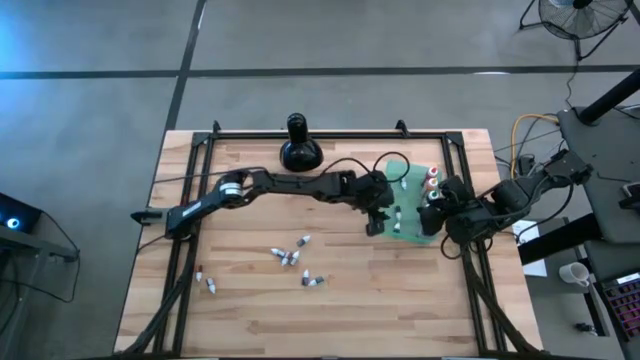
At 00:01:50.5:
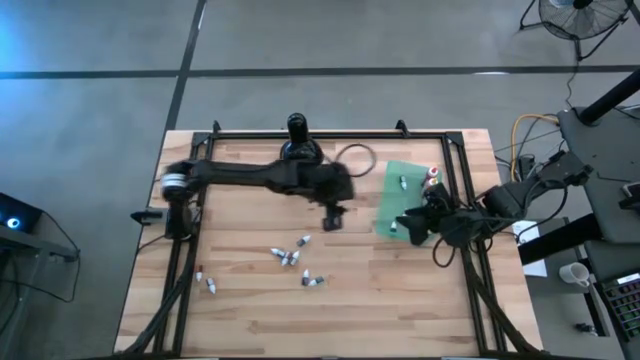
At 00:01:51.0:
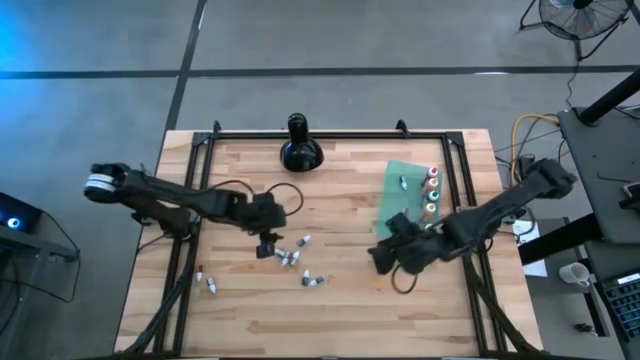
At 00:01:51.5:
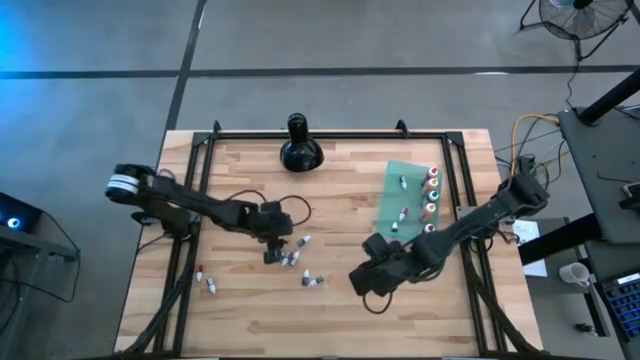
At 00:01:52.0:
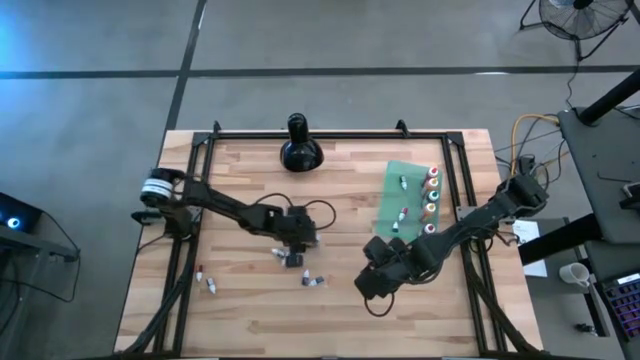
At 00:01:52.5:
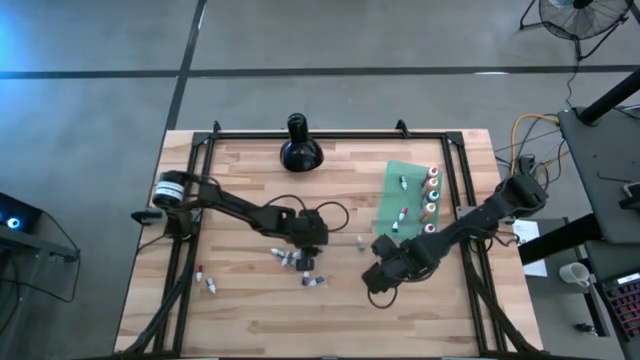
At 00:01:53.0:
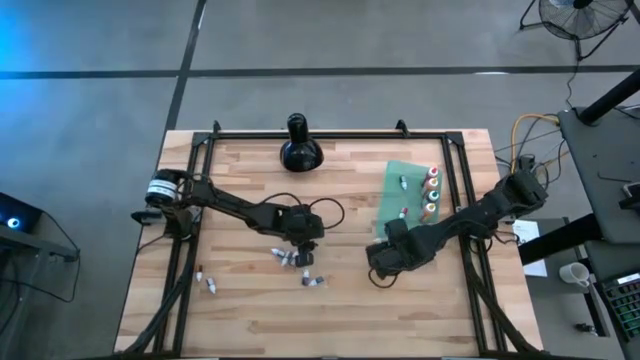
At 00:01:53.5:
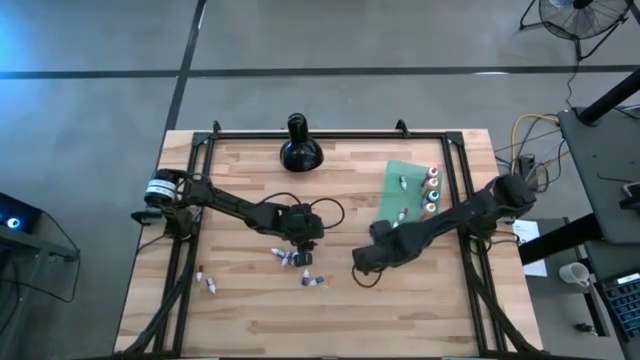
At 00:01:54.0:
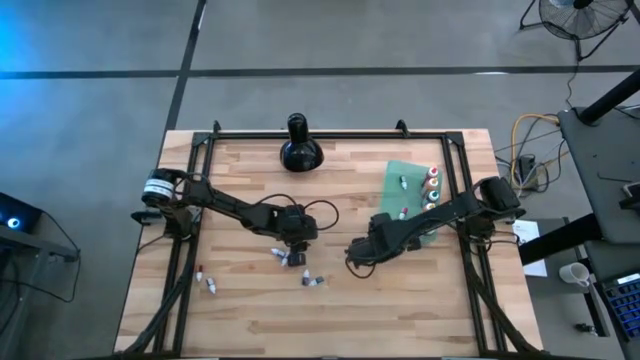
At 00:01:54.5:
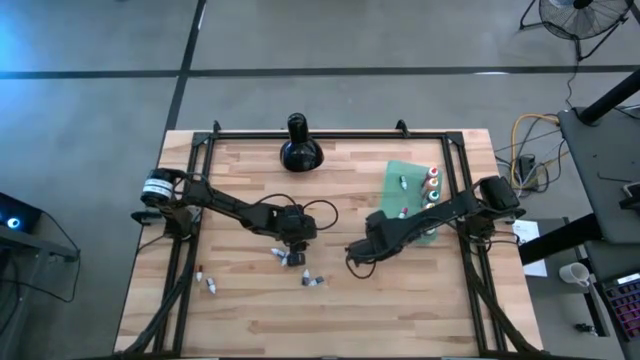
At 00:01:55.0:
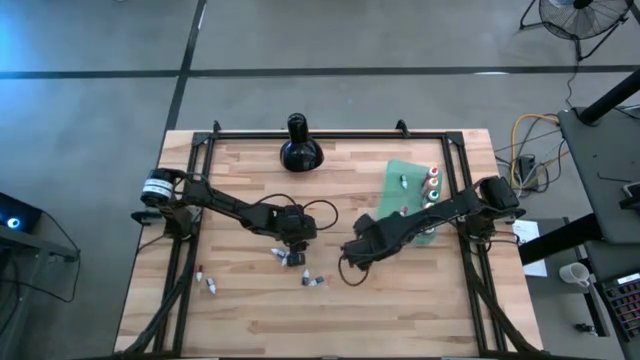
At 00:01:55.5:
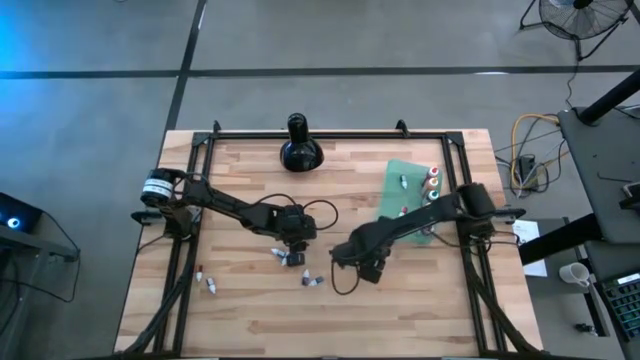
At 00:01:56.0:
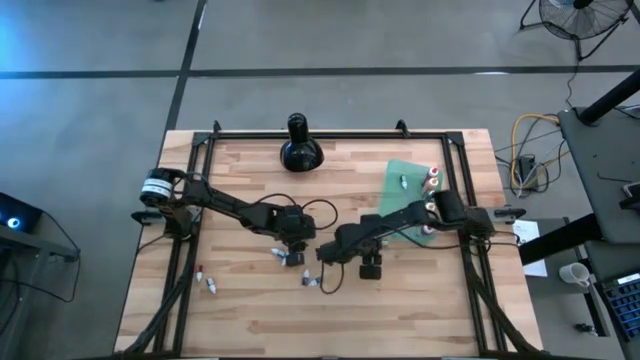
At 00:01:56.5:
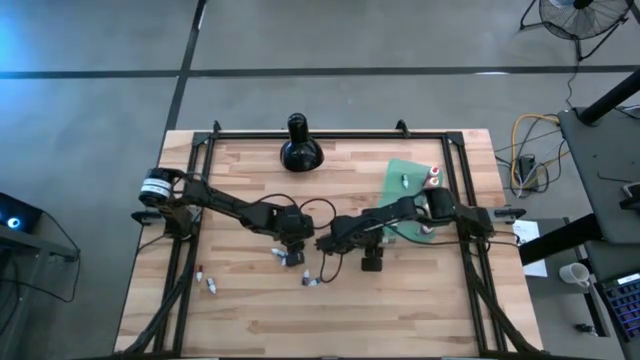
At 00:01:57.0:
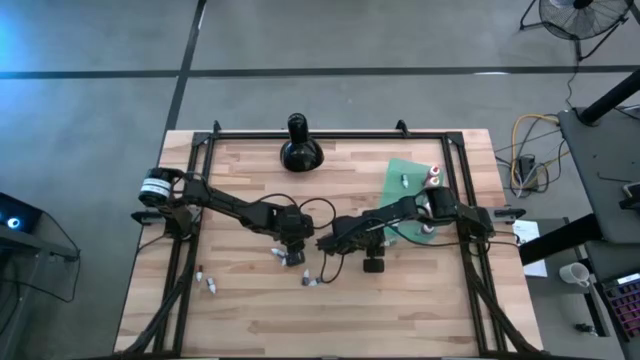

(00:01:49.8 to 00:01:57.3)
Task: Pick & Place food coloring
Put the top small green food coloring bottle into the green bin

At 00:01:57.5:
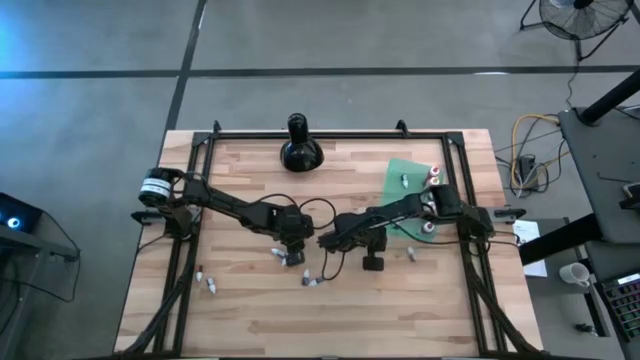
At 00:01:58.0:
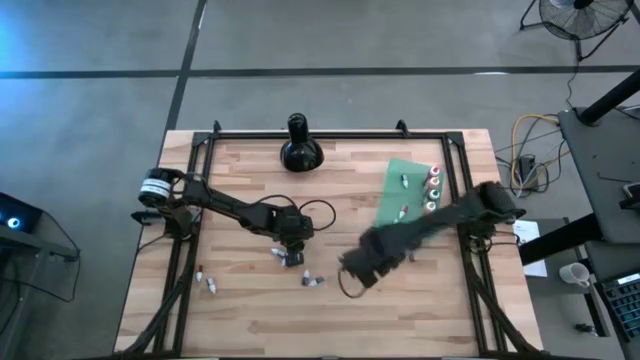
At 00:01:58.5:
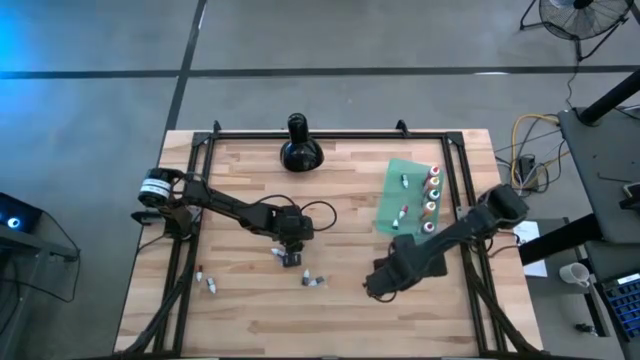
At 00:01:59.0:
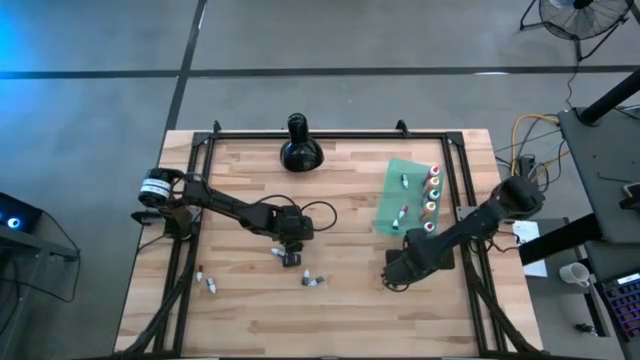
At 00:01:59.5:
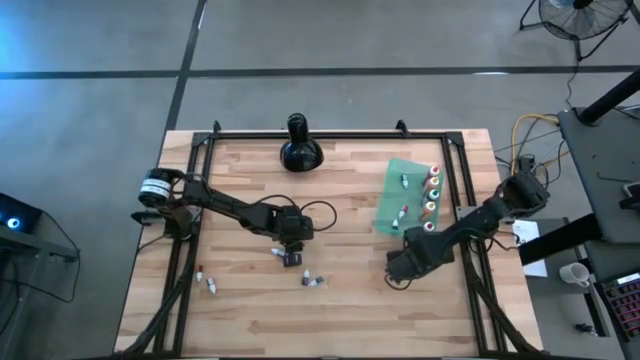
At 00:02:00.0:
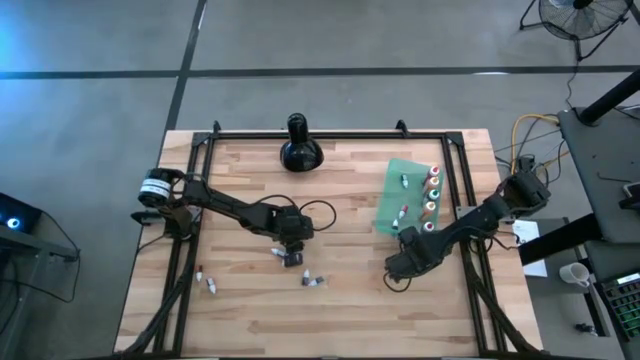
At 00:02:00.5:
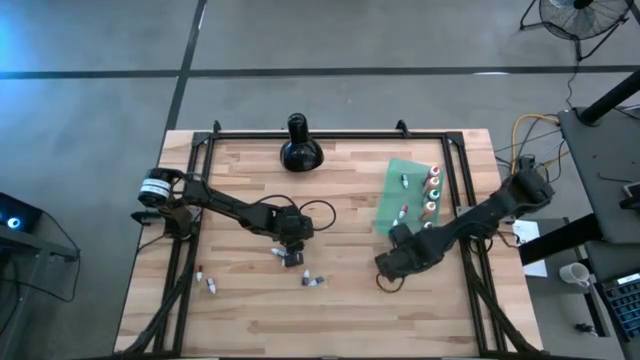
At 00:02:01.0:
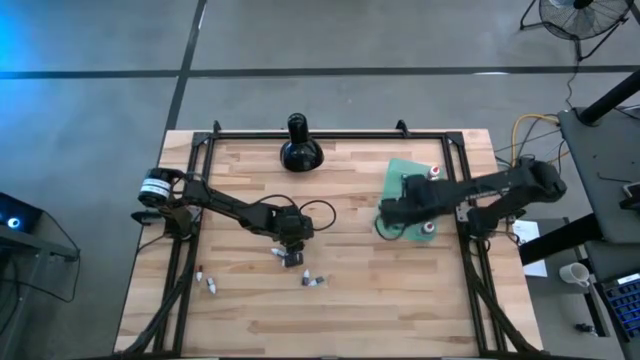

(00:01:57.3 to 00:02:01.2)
Put the top small green food coloring bottle into the green bin

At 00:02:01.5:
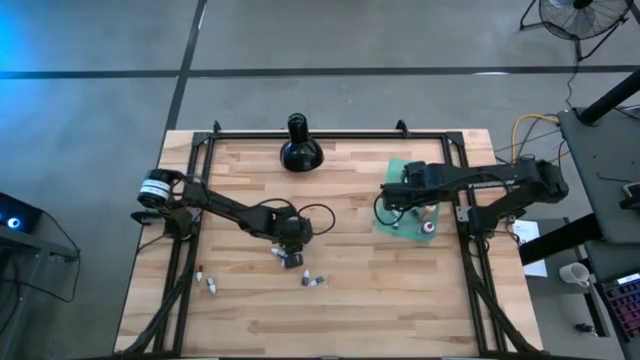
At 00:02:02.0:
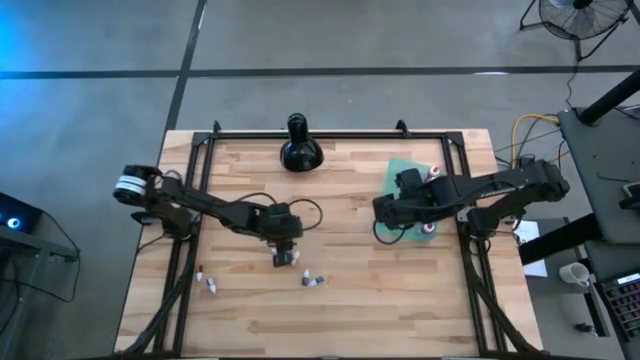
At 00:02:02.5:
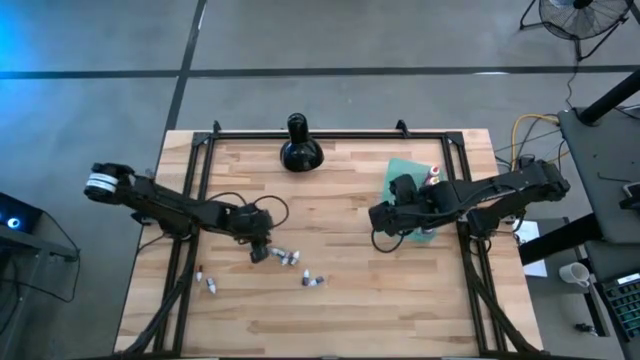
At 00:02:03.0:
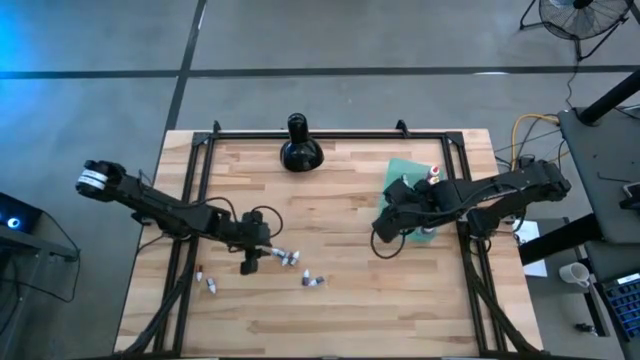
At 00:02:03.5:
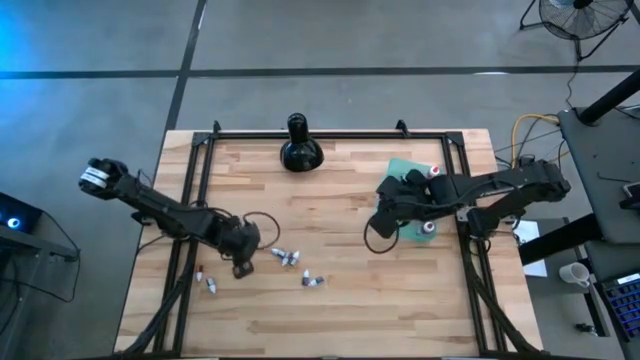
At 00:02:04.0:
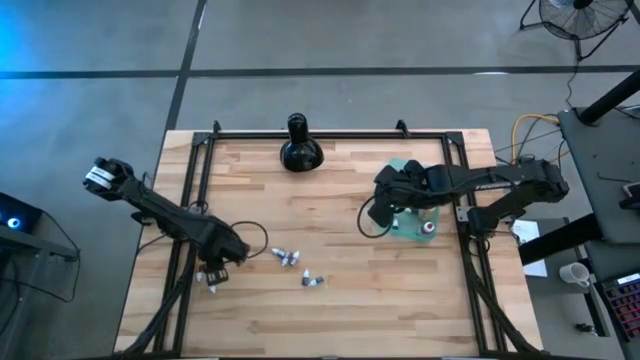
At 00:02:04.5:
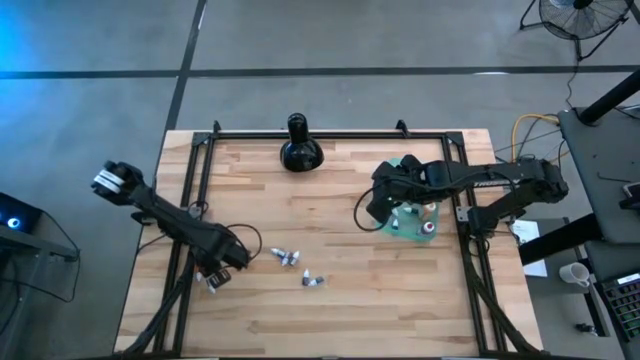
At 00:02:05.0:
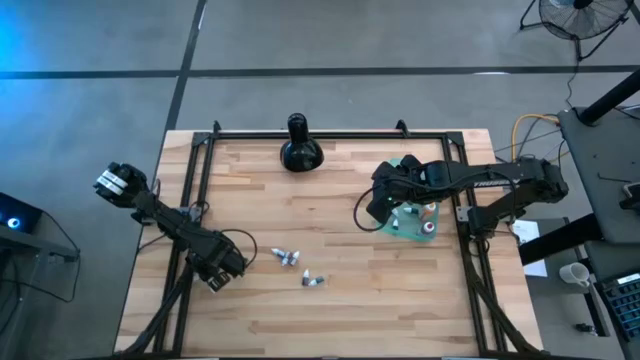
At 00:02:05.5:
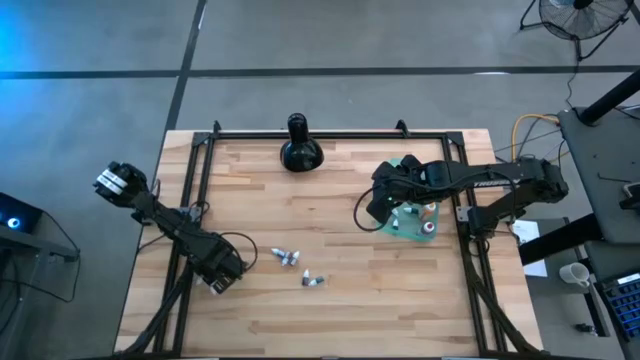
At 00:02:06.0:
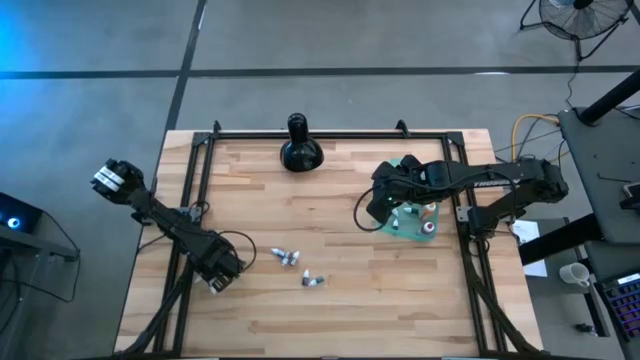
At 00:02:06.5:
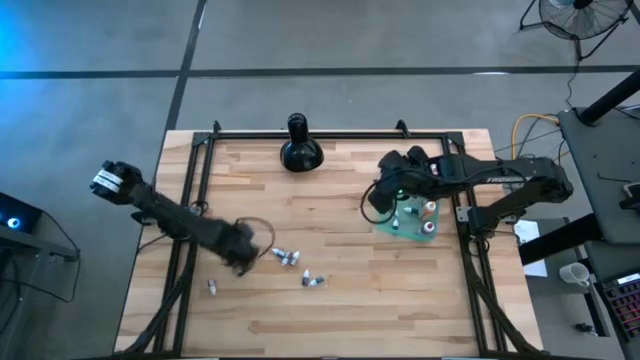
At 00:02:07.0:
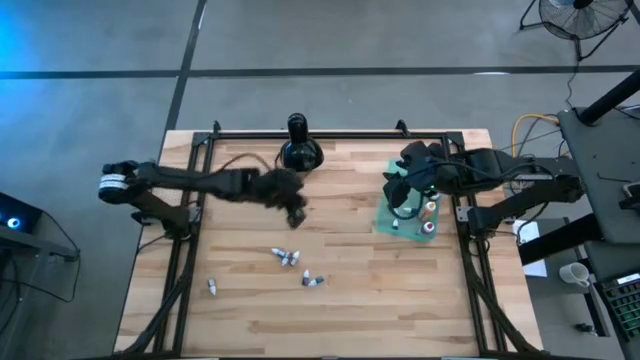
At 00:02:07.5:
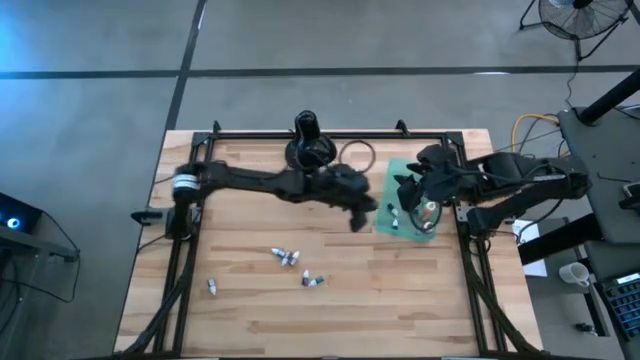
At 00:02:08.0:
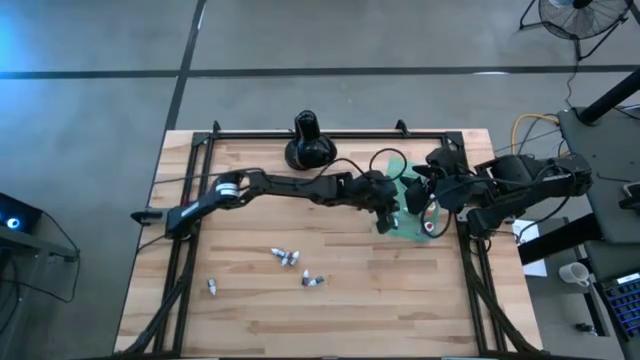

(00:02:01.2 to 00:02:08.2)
Put the small brown food coloring bottle into the green bin

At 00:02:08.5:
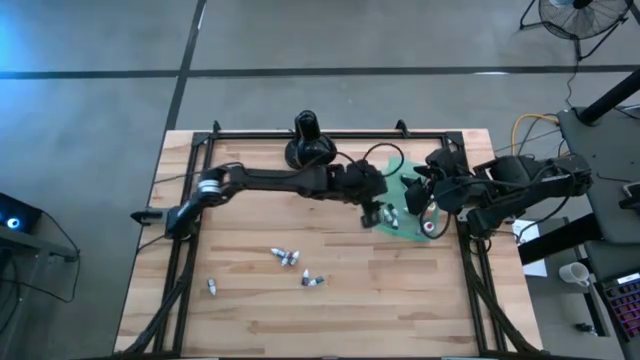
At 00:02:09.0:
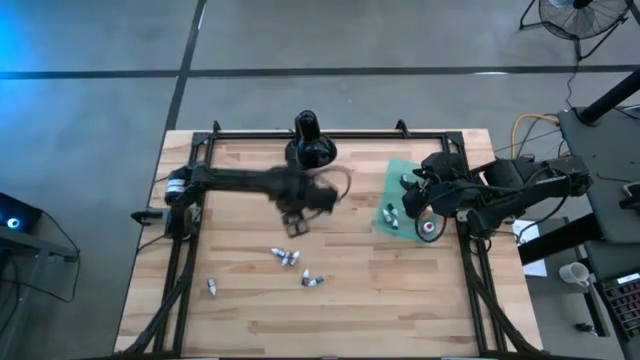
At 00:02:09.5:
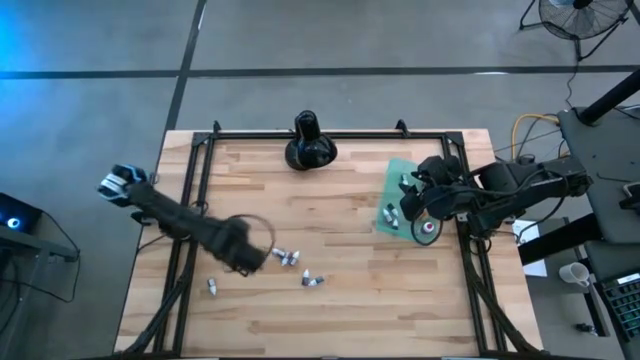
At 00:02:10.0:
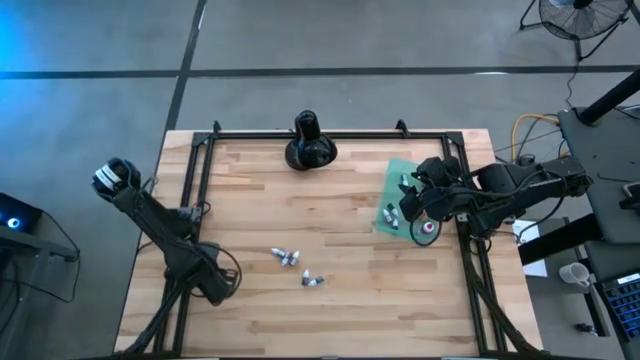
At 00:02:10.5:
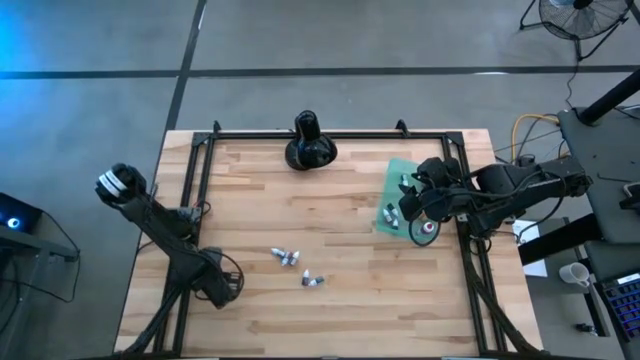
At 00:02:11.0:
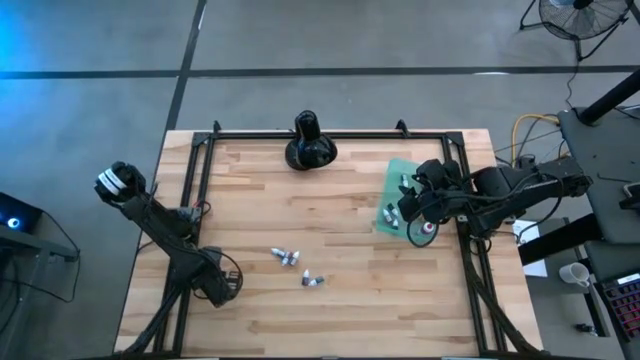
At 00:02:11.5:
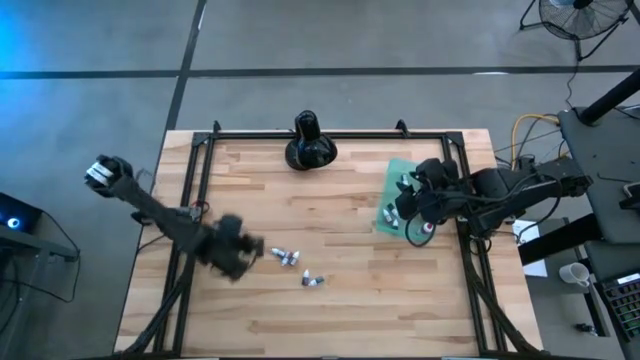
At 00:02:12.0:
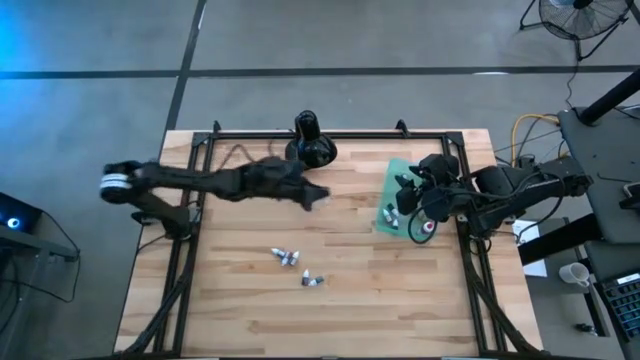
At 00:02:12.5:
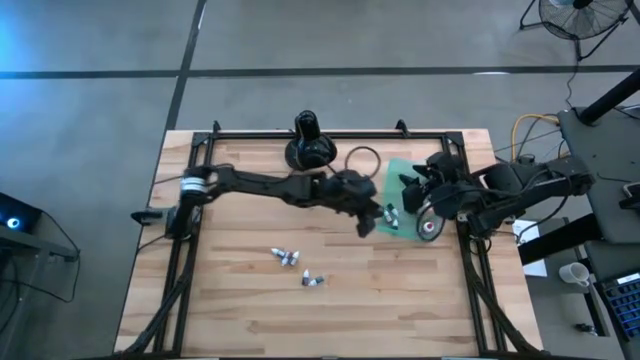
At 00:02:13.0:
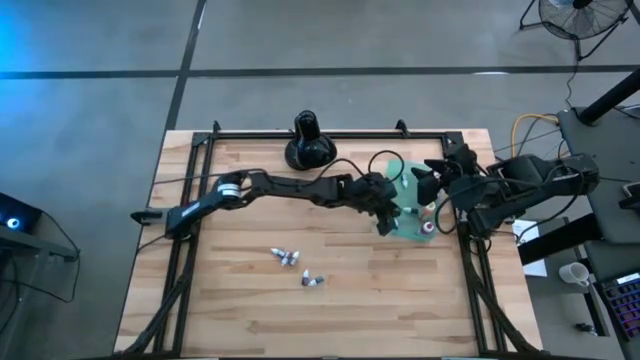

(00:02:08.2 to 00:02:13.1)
Put the bottom small red food coloring bottle into the green bin
